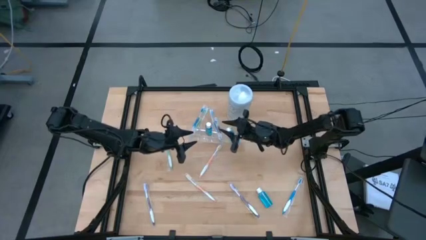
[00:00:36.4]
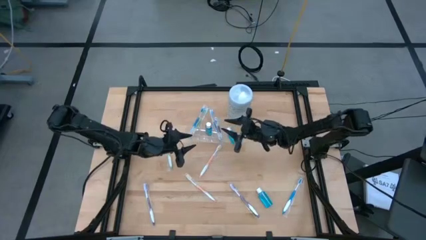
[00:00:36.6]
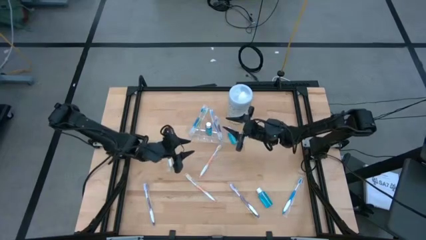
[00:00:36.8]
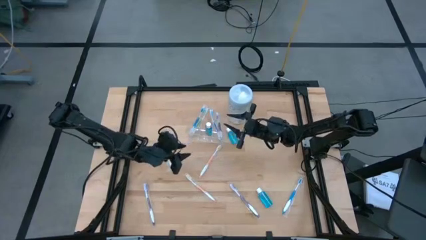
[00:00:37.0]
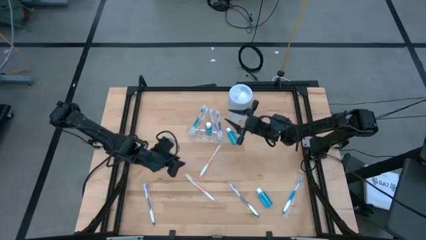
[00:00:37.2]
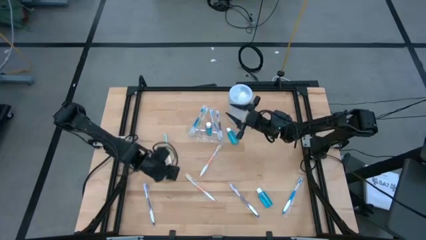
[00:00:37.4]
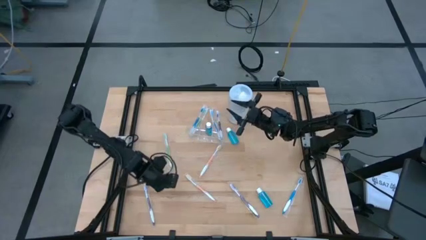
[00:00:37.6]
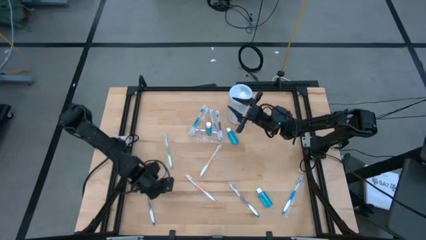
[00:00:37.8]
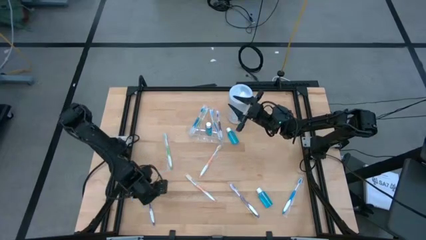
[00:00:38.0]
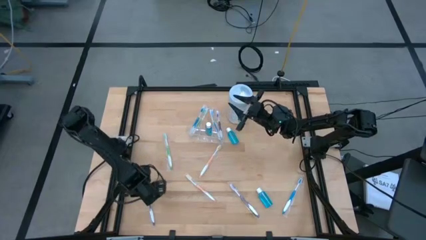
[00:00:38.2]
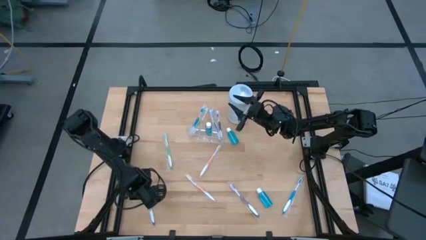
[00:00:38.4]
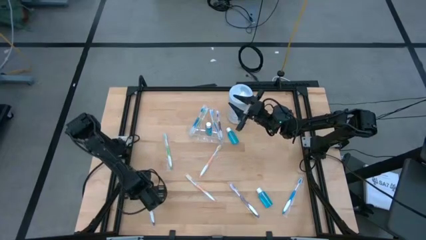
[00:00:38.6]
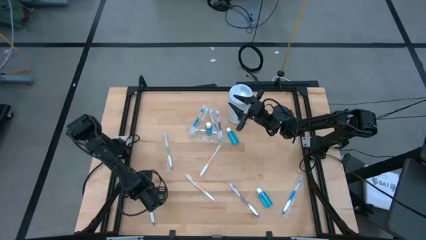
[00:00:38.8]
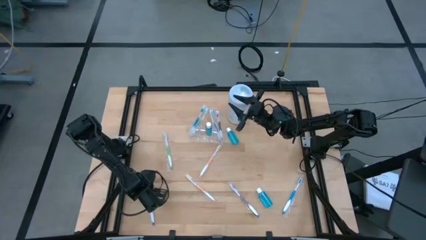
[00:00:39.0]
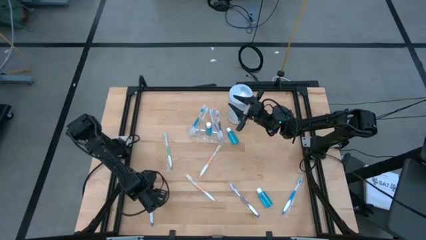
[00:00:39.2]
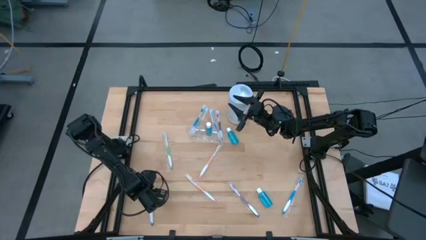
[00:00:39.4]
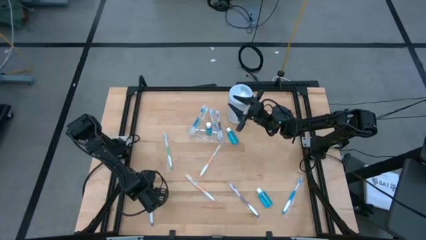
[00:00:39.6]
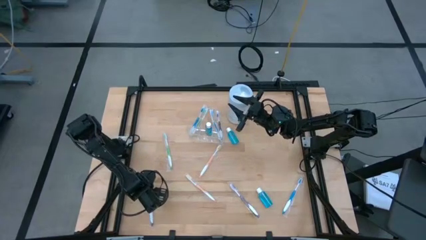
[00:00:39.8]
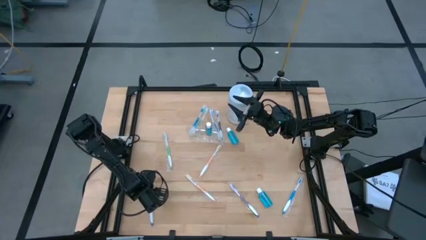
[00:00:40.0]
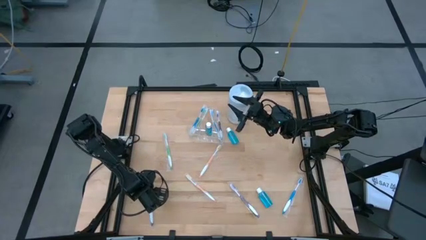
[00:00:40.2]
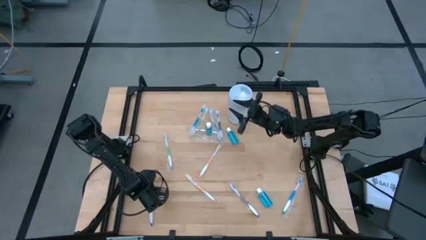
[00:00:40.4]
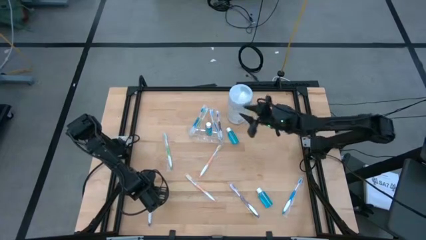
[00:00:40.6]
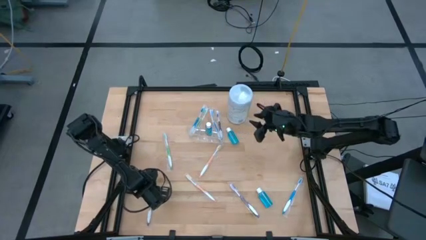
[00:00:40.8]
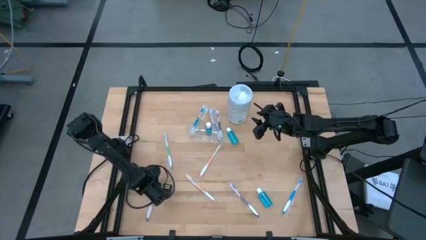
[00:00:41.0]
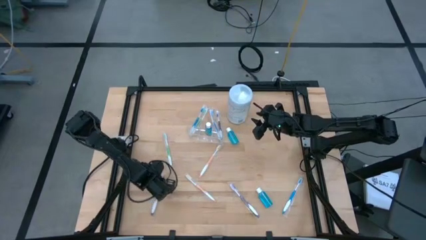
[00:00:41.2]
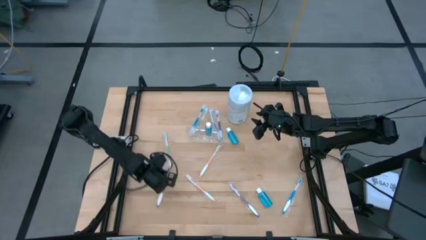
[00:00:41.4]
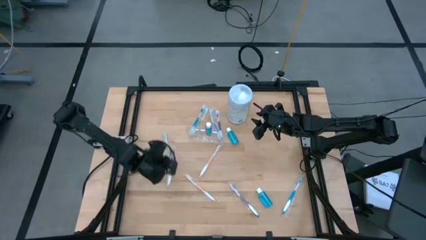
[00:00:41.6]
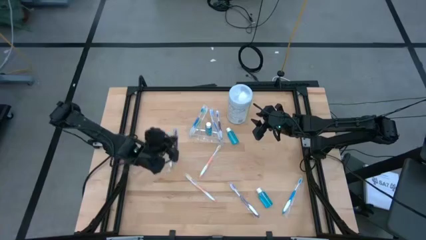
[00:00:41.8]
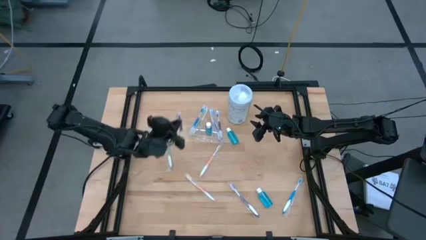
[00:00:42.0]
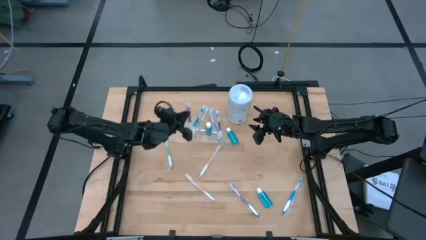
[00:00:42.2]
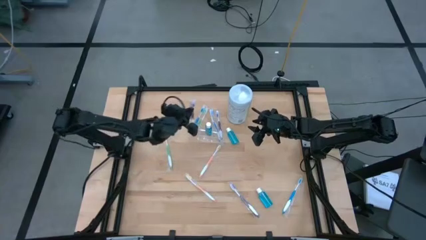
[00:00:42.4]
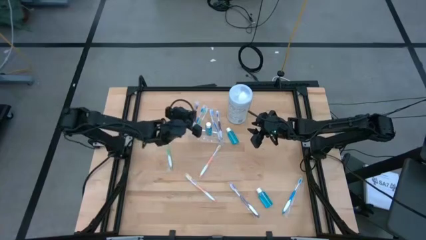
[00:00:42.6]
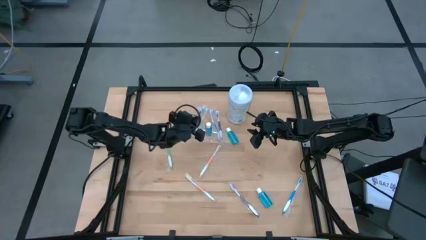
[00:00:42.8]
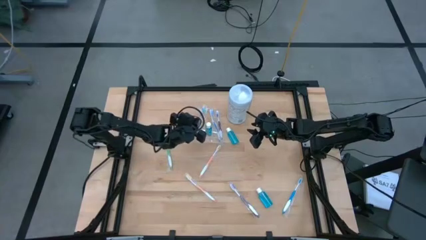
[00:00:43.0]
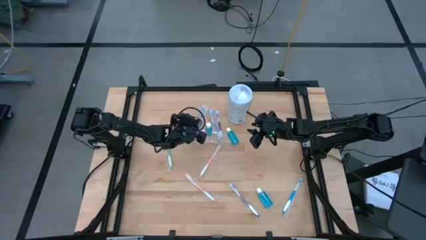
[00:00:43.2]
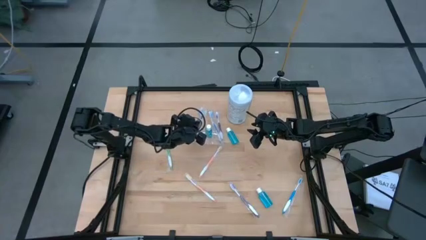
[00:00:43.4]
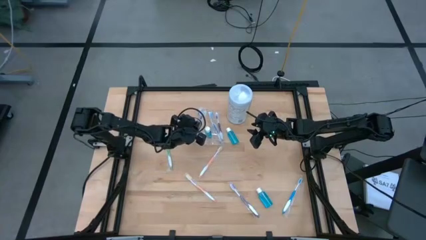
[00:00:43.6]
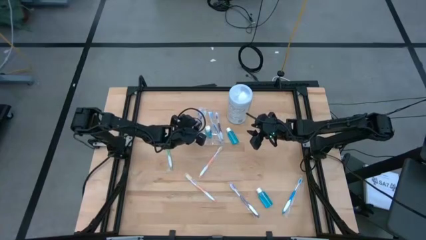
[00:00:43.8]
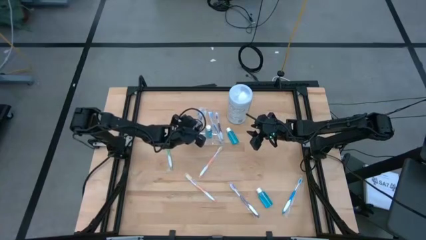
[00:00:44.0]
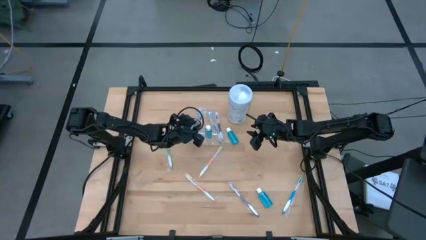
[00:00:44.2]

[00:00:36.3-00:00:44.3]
Task: Pick & Place toothbrushing station
Put the left violet toothbrush into the transparent organizer

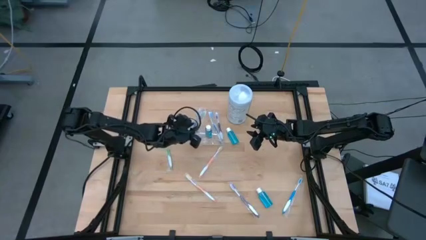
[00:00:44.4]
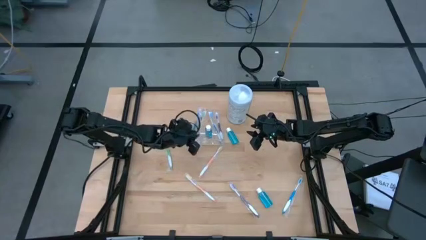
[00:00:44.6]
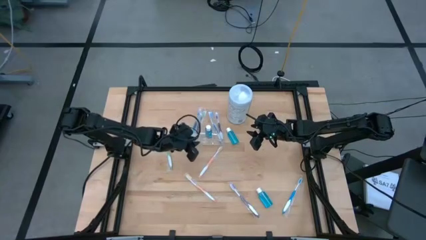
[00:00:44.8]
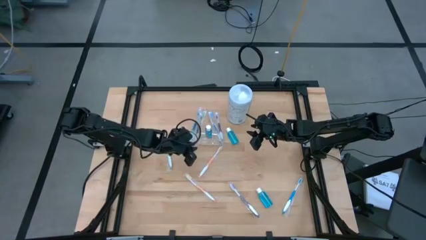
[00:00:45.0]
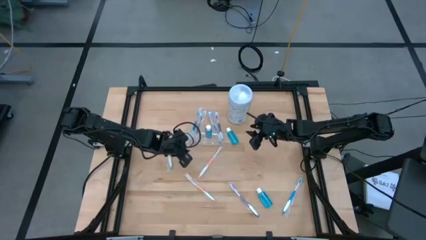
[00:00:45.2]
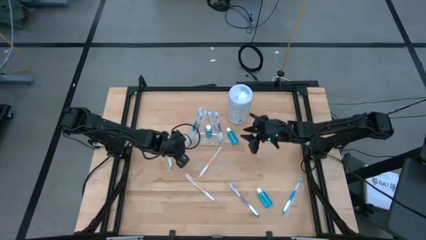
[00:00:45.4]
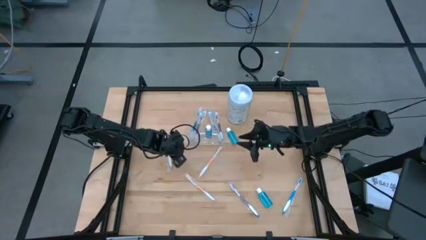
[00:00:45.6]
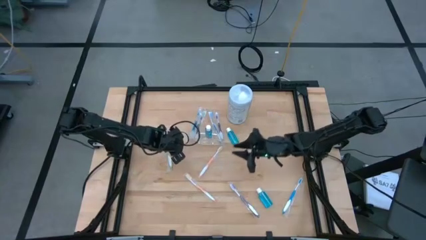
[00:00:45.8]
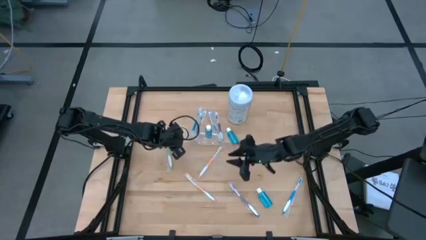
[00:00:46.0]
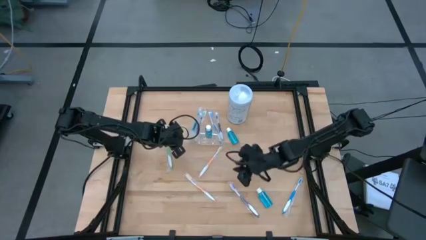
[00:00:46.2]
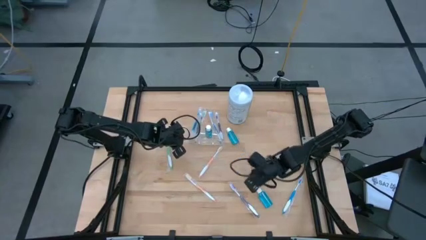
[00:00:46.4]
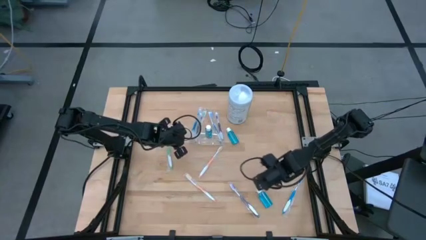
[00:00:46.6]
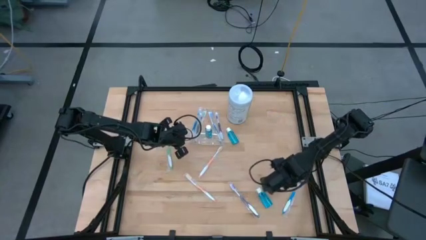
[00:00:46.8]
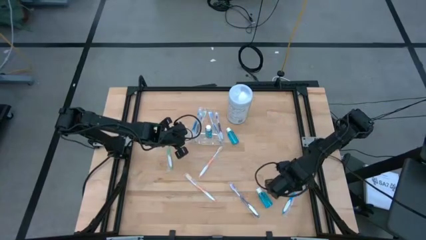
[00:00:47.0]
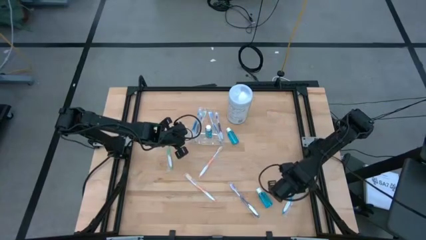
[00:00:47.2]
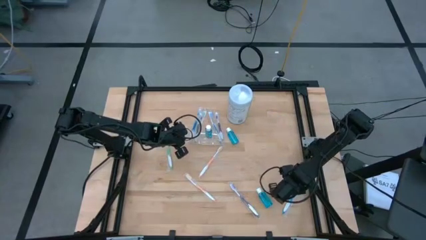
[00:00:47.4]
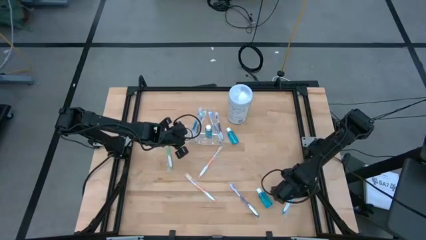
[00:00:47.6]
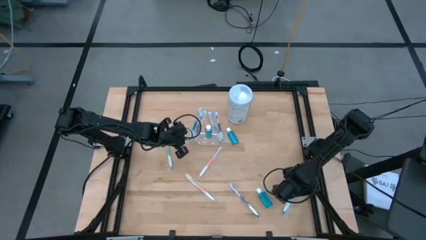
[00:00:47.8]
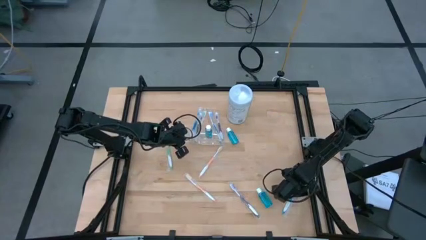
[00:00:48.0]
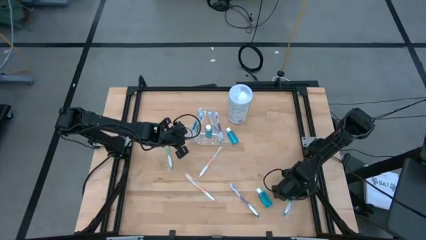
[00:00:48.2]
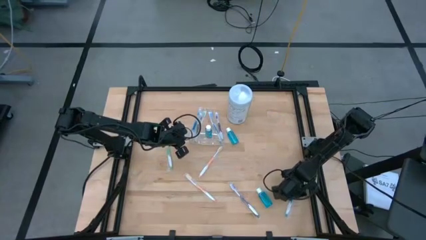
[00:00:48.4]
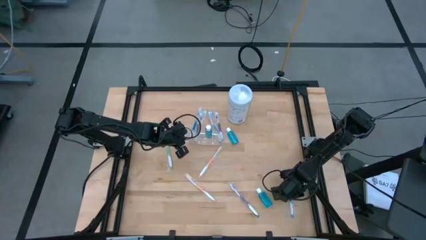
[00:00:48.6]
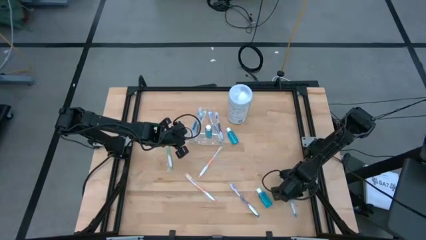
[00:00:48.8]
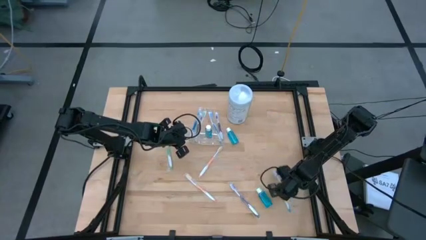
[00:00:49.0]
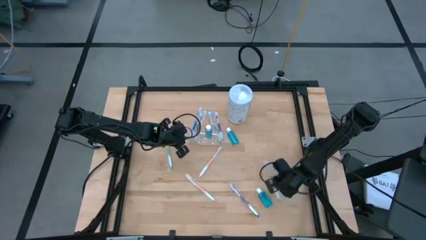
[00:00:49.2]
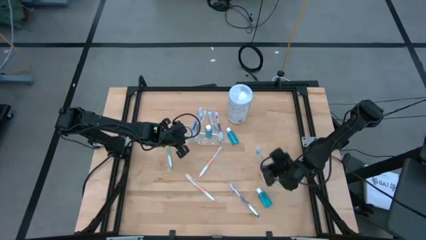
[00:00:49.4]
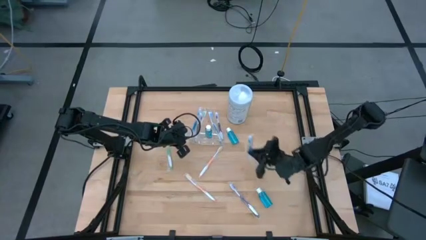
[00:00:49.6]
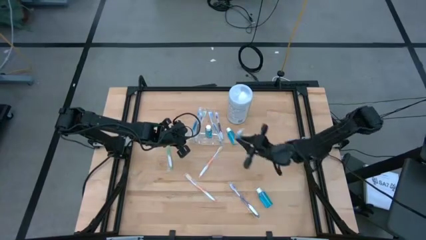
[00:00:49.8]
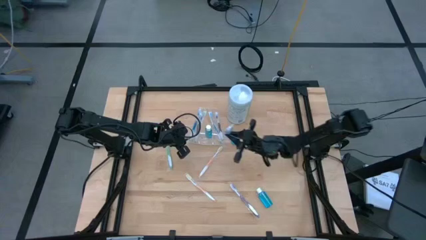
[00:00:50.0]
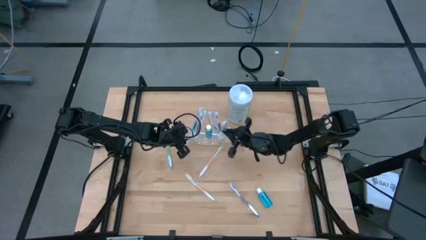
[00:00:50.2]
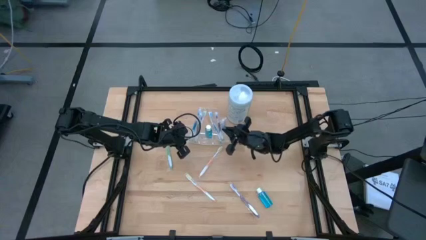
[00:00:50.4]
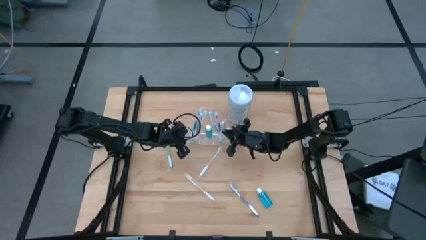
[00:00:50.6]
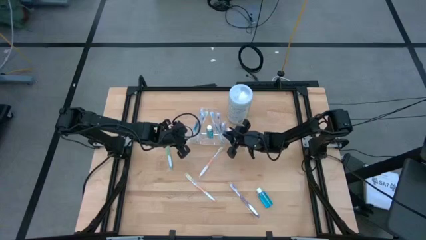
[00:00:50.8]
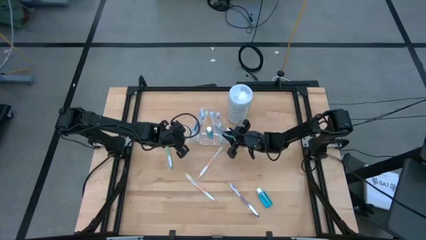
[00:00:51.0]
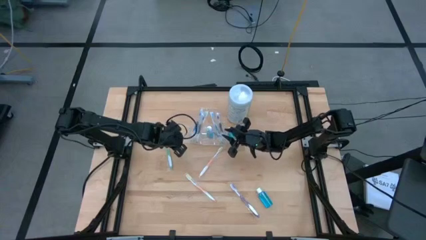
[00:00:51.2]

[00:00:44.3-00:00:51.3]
Put the blue toothbrush into the transparent organizer

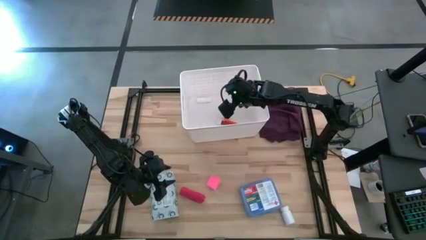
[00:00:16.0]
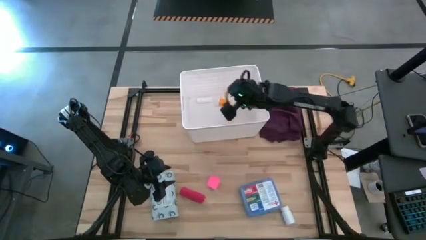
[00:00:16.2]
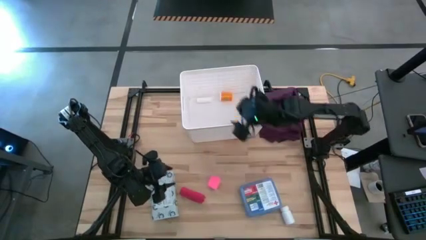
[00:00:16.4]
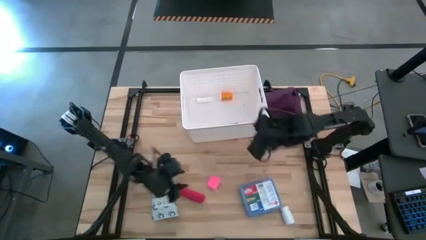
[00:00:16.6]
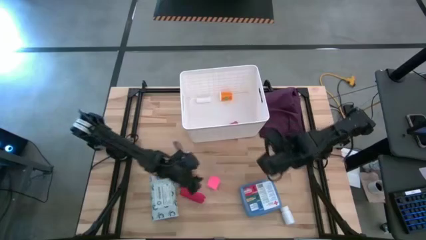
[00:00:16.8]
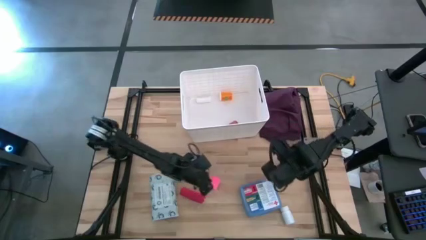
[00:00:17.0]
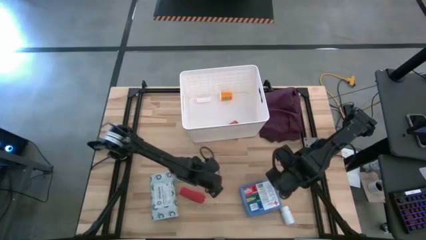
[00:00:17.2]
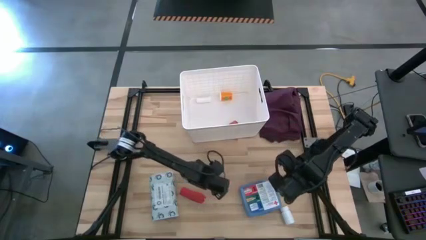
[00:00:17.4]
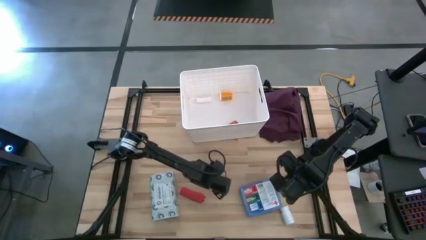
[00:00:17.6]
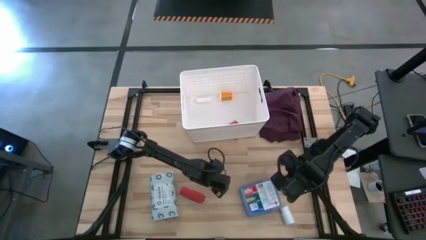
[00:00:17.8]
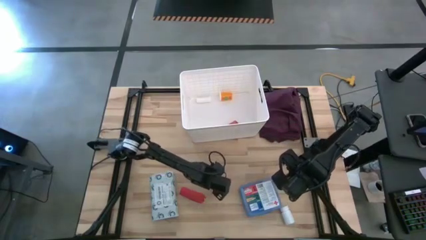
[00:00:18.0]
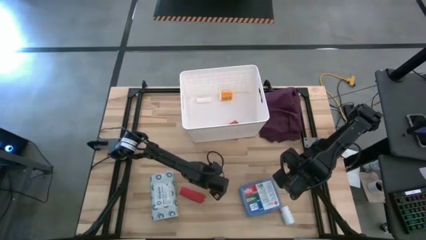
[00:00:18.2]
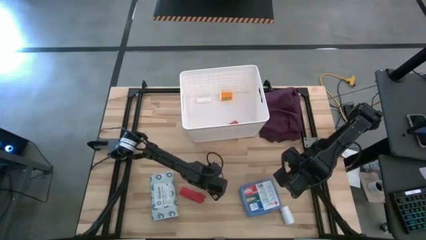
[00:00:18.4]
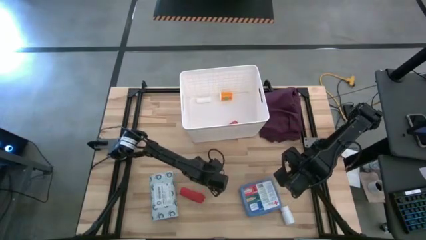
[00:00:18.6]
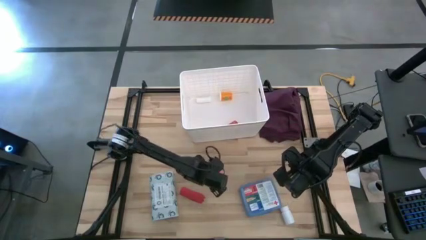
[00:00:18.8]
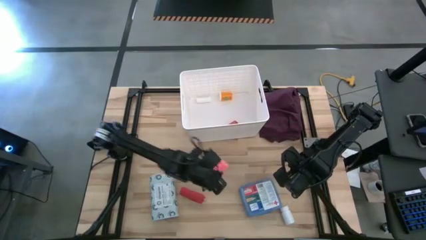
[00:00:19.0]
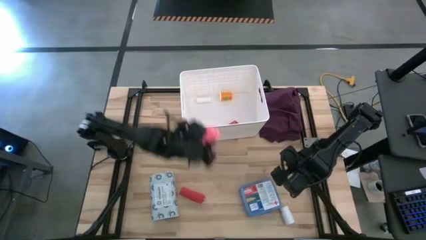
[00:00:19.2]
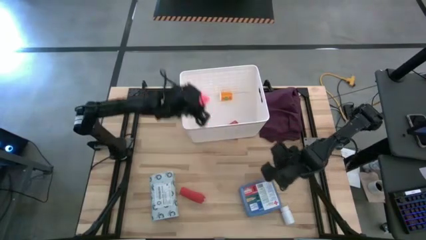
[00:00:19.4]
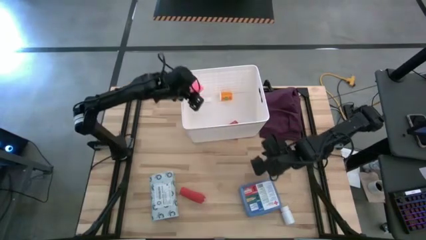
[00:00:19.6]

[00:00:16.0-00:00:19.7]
Task: Pick & place medical supplies in basket/bin
Put the pink bandage into the white bin
